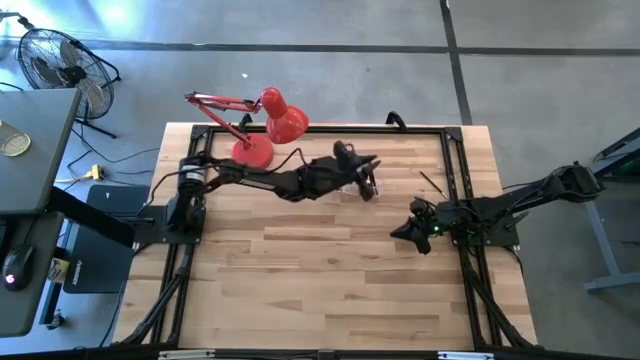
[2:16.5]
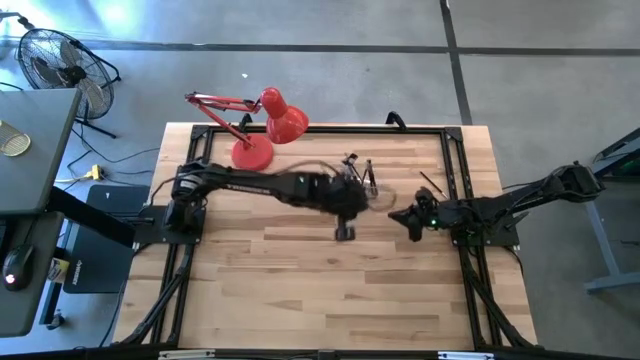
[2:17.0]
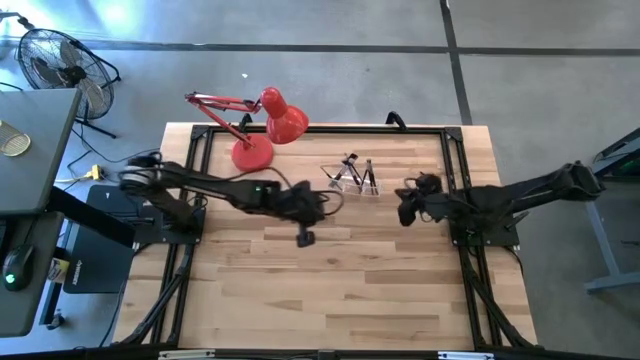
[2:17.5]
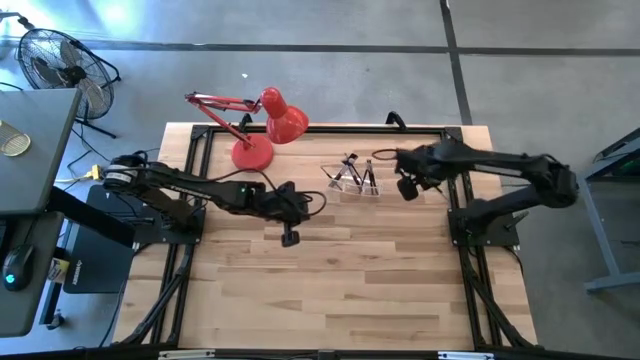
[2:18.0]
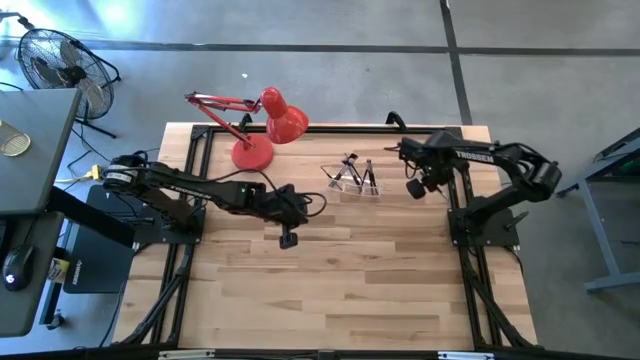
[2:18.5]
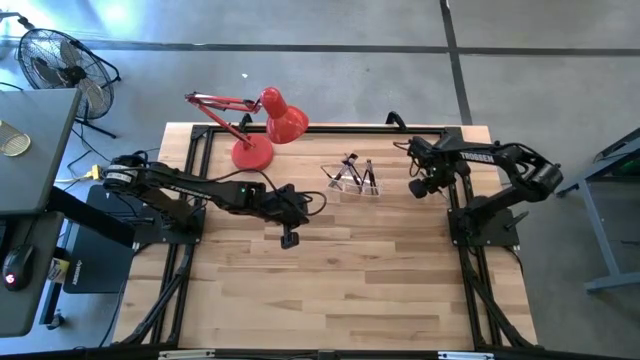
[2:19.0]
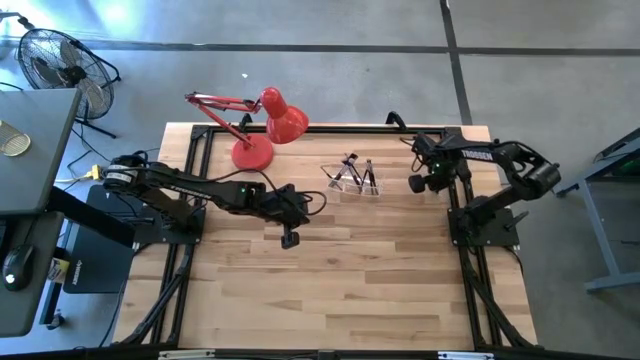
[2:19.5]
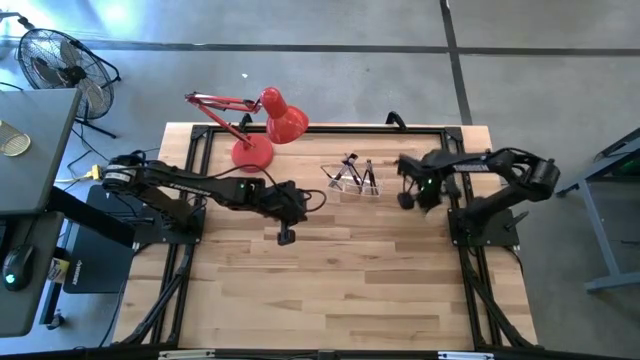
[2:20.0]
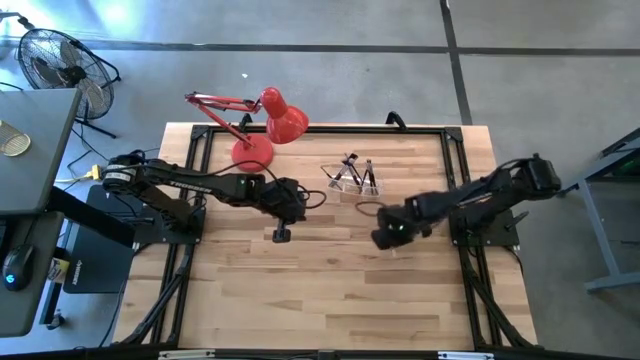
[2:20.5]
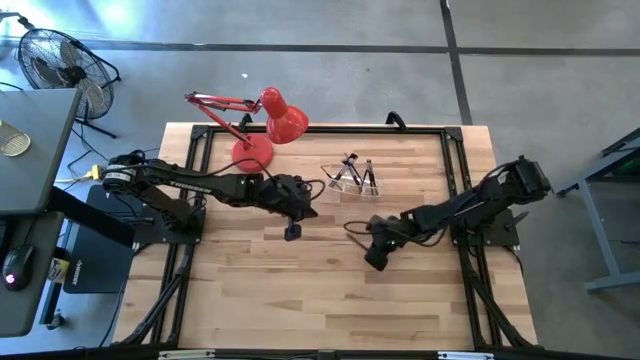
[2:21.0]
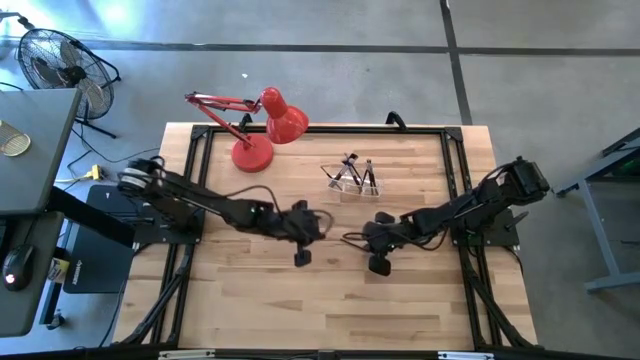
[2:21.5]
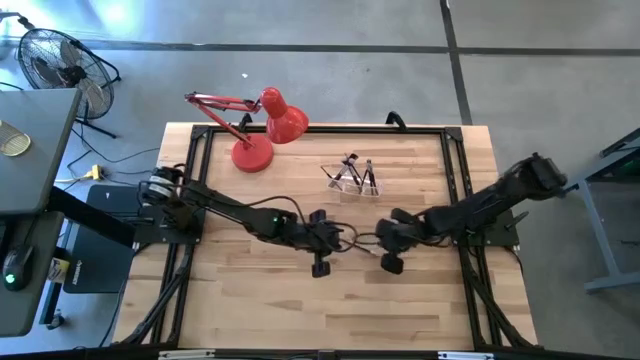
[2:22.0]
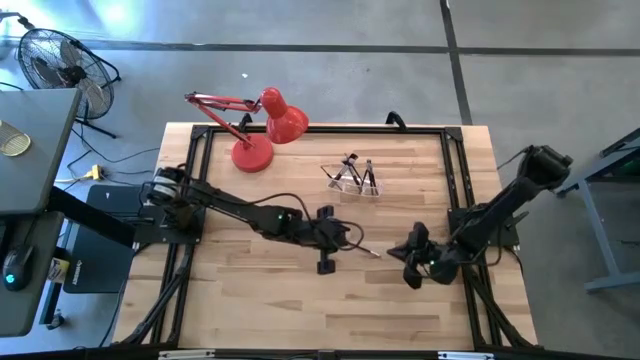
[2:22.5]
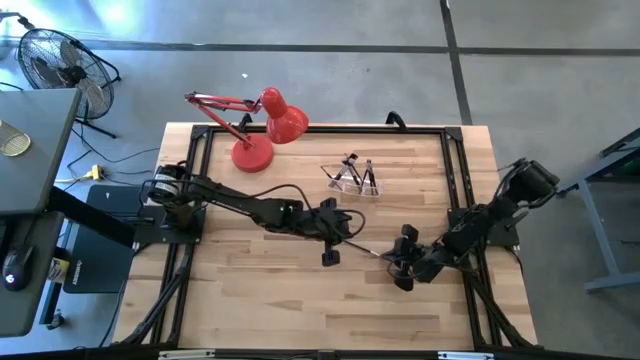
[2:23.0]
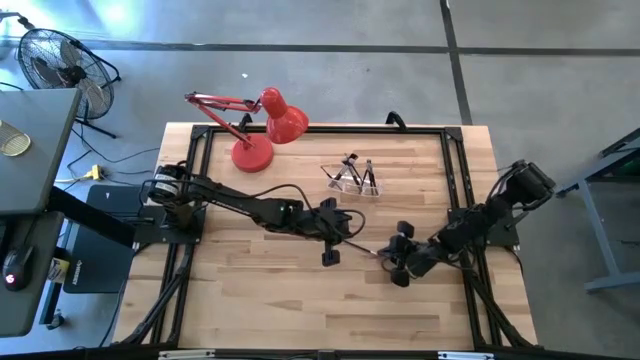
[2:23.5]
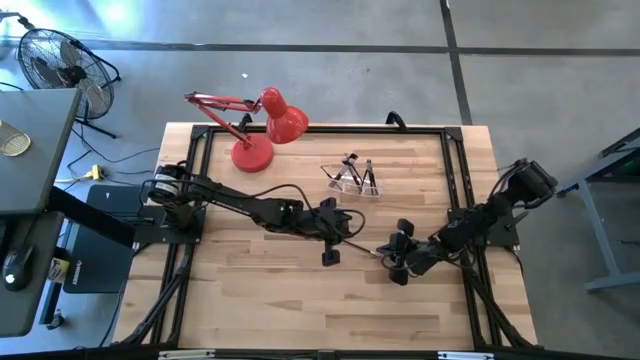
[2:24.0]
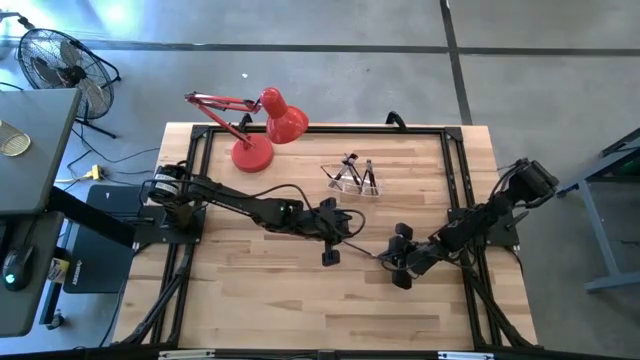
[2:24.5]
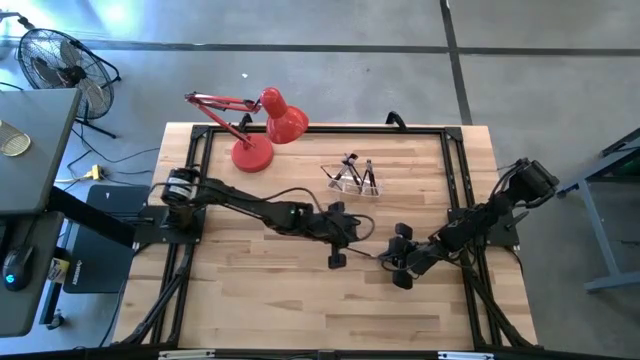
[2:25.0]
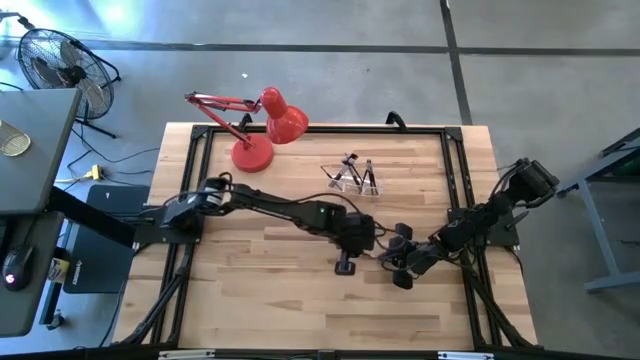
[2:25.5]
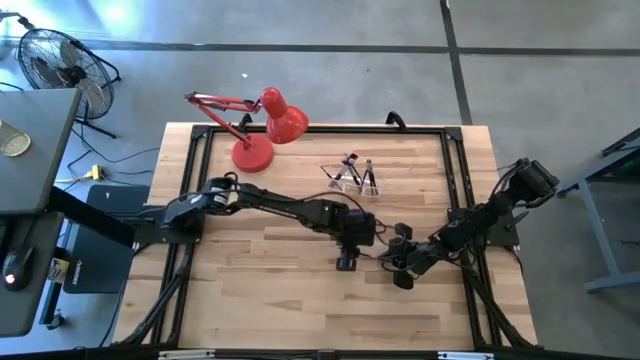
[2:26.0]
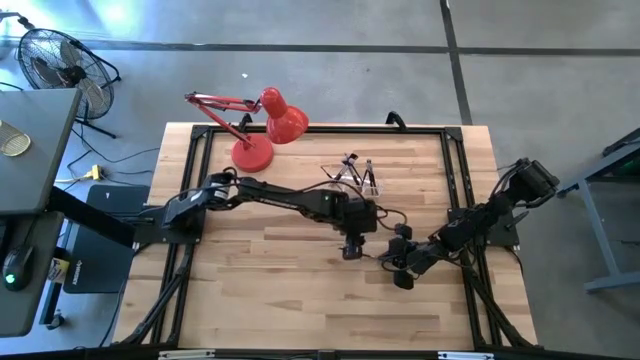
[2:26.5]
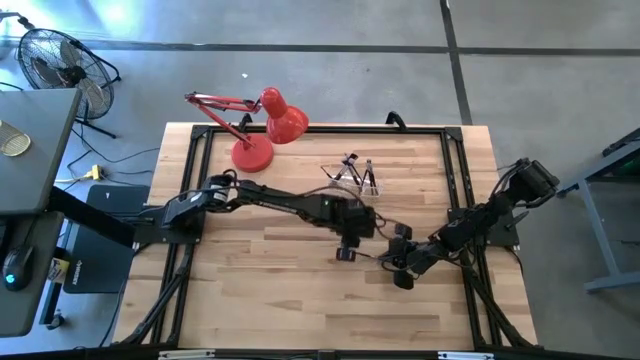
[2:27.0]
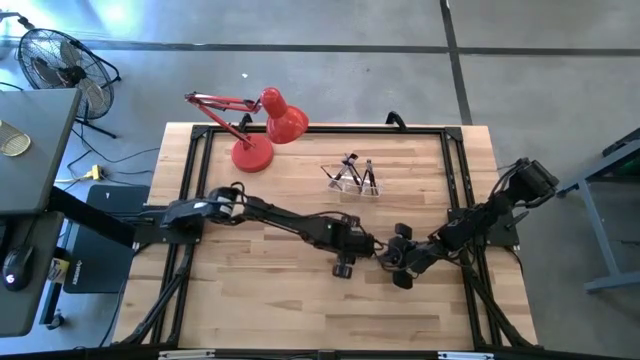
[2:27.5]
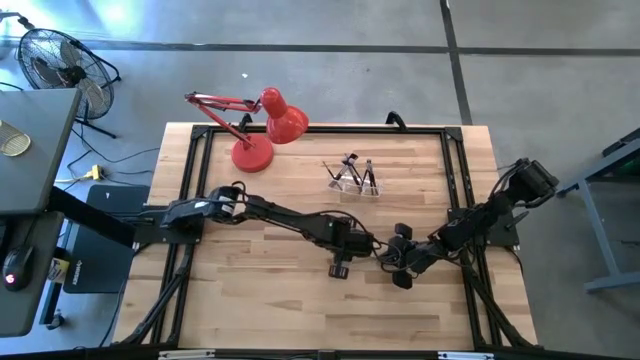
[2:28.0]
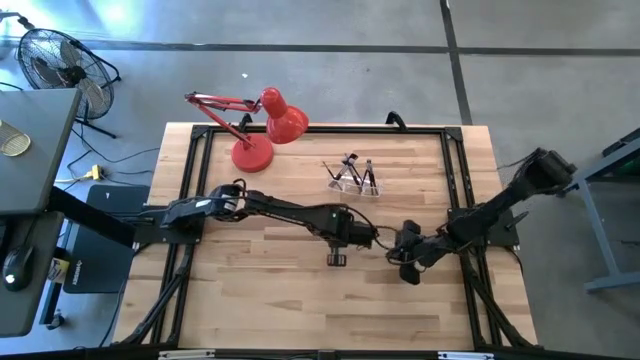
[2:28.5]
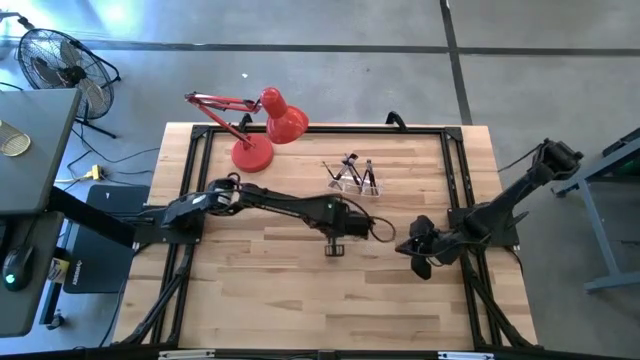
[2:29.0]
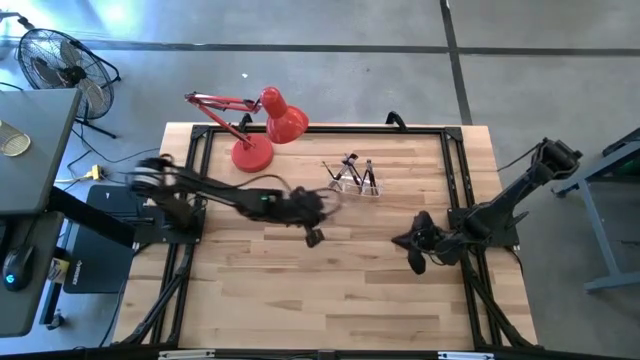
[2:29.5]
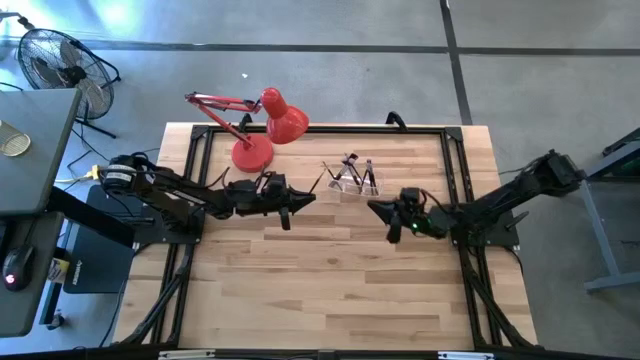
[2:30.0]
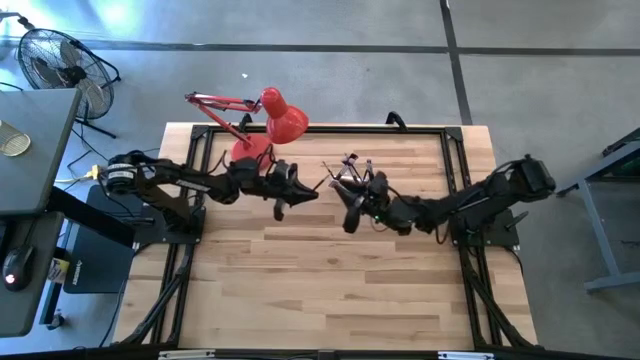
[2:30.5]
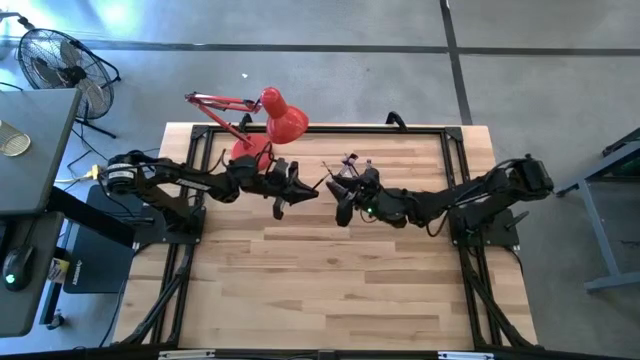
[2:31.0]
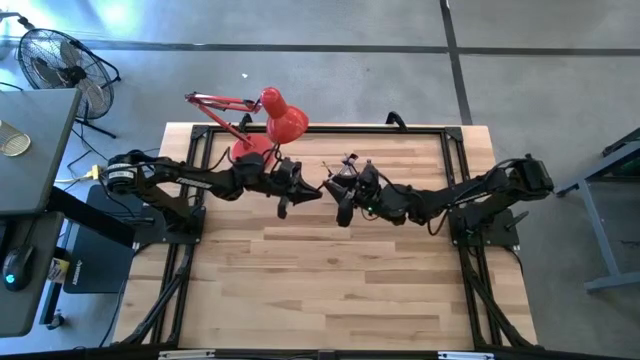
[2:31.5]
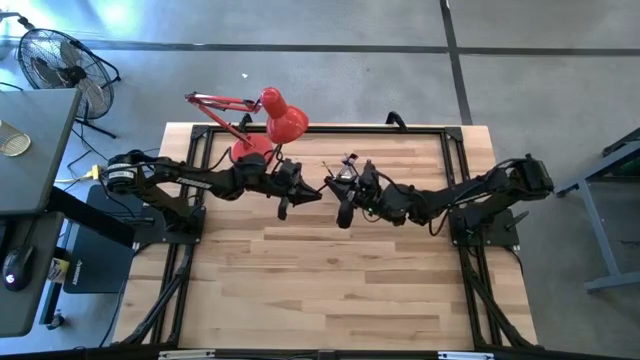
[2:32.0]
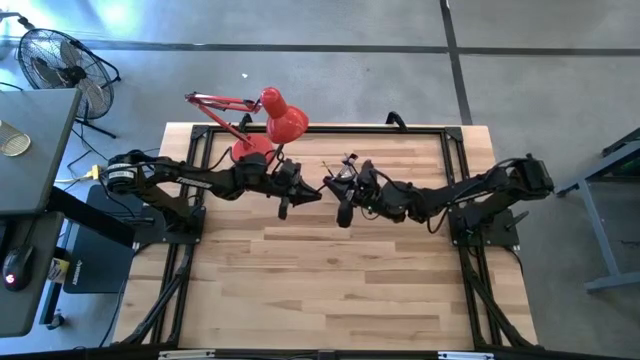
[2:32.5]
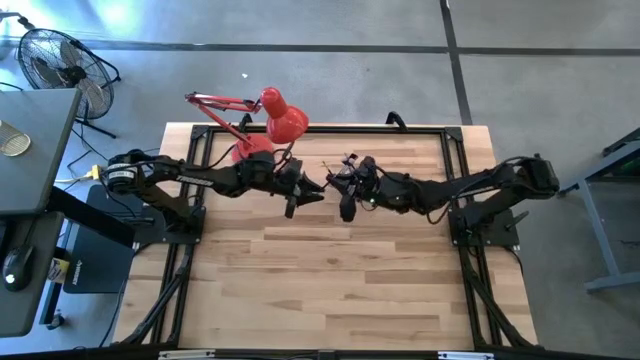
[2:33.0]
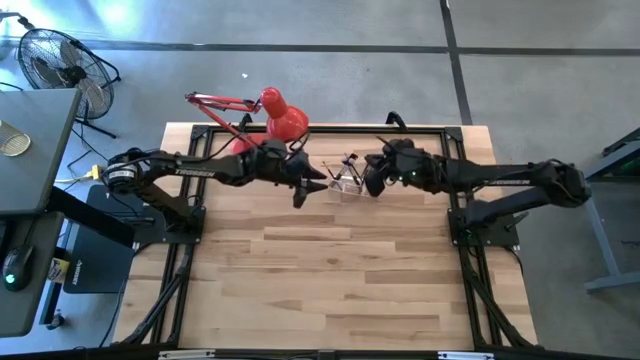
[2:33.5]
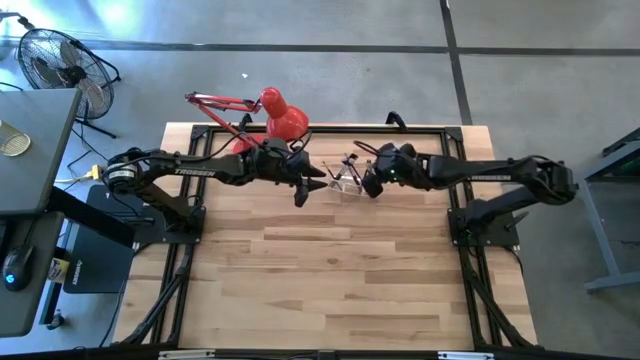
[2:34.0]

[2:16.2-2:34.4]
Task: Put items in baskets/containers
Put the eyeshadow brush into the transparent organizer
